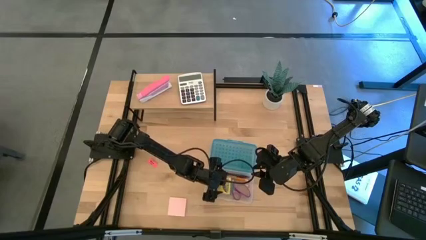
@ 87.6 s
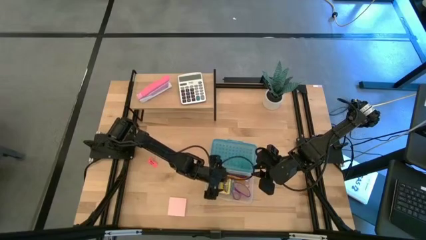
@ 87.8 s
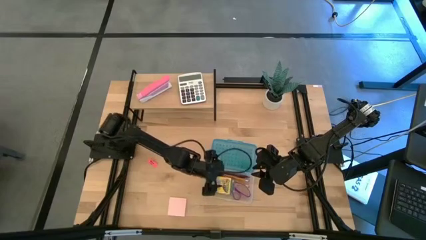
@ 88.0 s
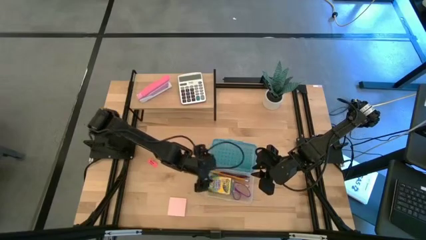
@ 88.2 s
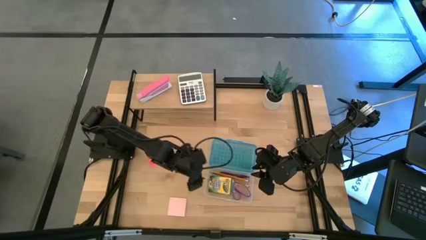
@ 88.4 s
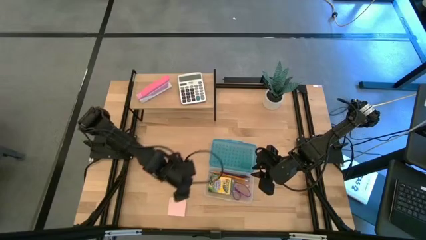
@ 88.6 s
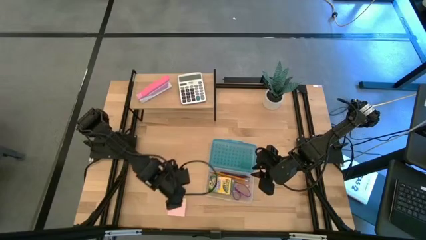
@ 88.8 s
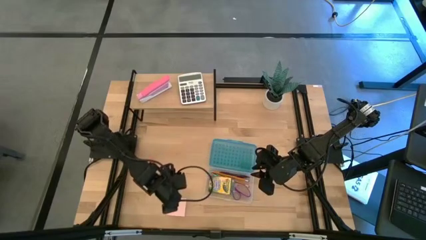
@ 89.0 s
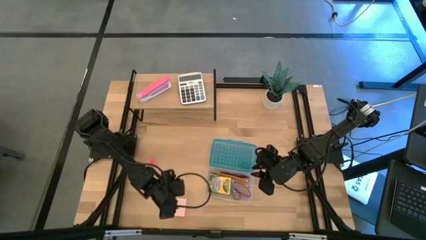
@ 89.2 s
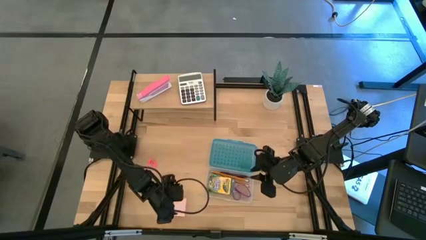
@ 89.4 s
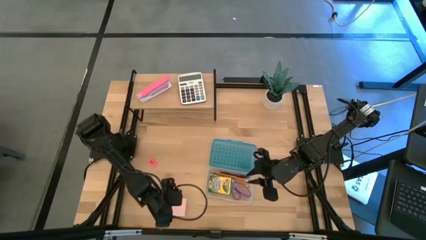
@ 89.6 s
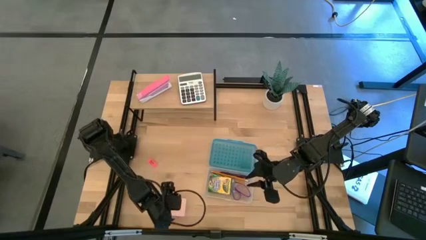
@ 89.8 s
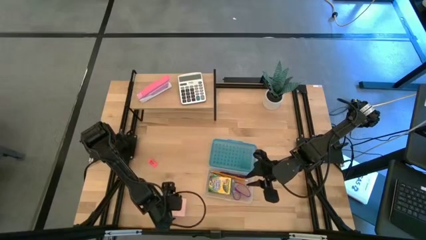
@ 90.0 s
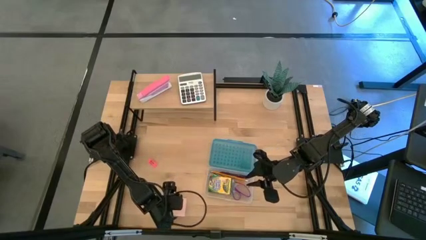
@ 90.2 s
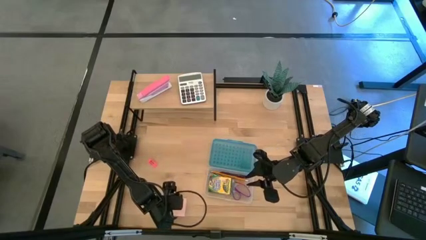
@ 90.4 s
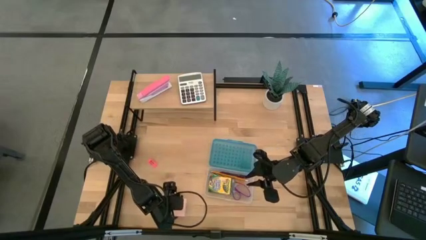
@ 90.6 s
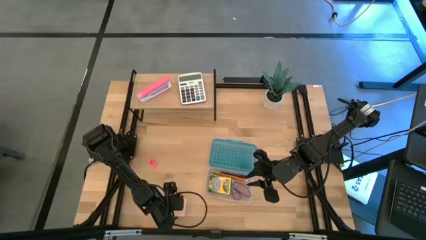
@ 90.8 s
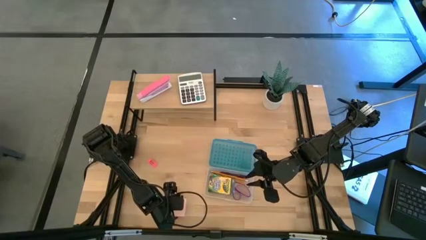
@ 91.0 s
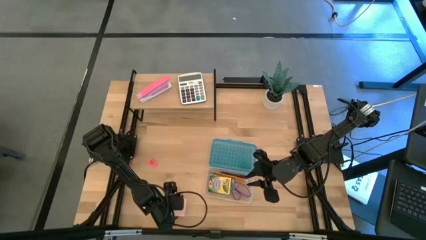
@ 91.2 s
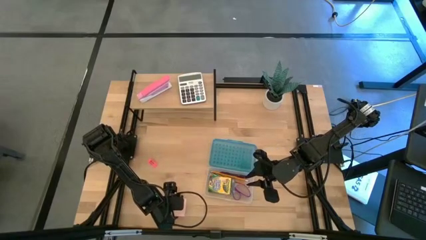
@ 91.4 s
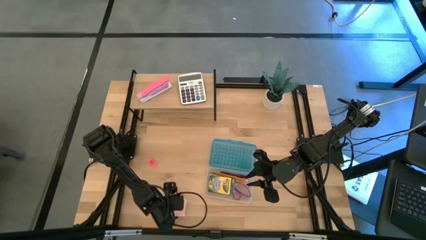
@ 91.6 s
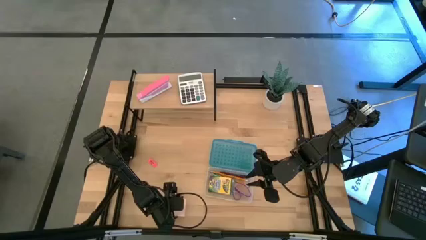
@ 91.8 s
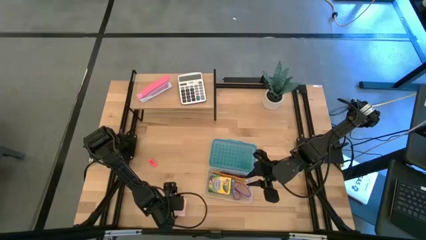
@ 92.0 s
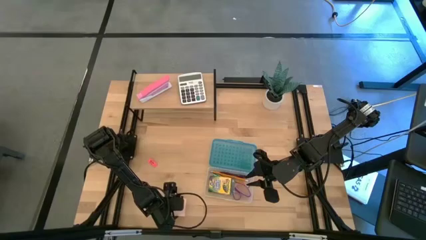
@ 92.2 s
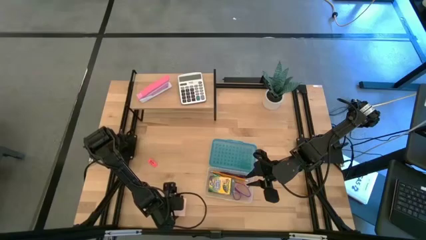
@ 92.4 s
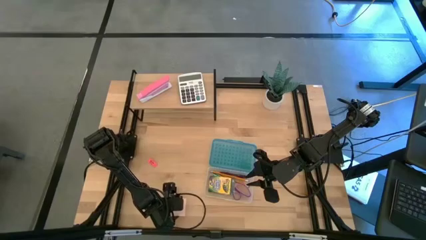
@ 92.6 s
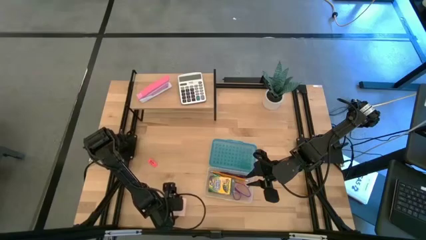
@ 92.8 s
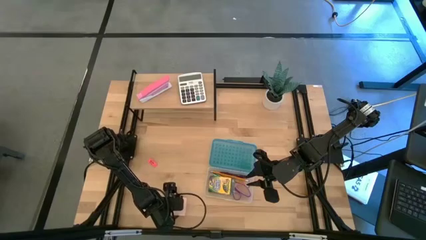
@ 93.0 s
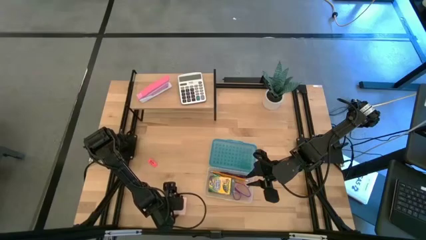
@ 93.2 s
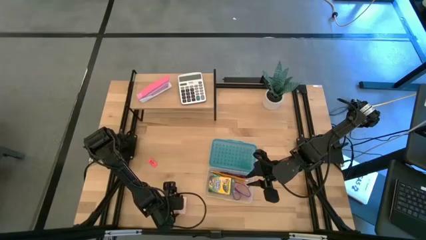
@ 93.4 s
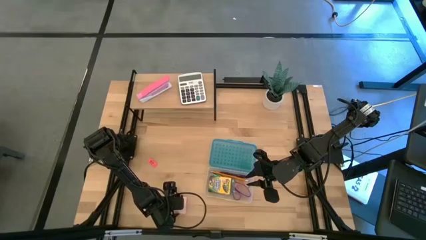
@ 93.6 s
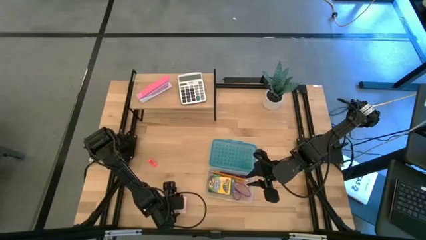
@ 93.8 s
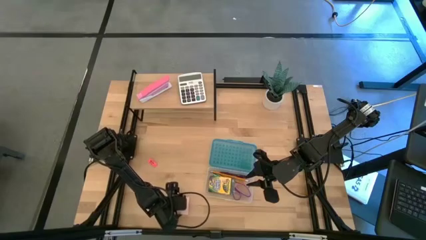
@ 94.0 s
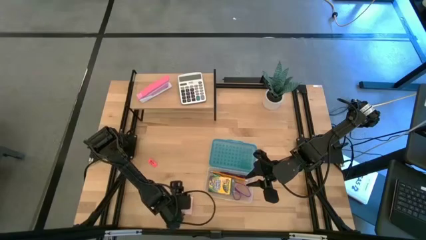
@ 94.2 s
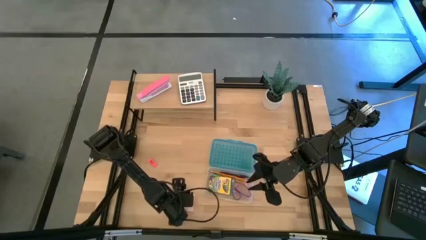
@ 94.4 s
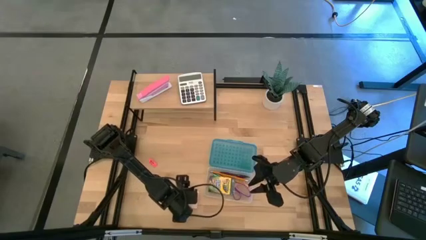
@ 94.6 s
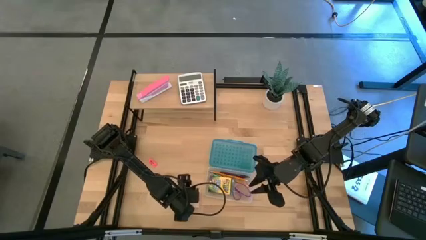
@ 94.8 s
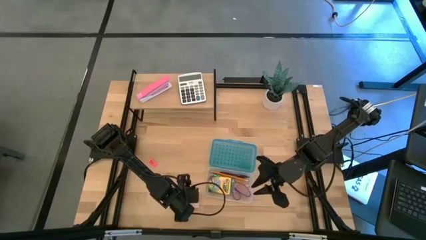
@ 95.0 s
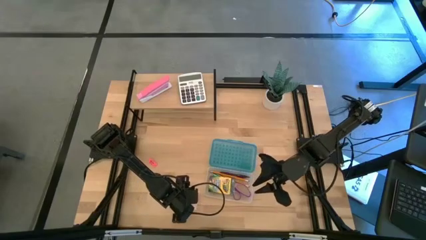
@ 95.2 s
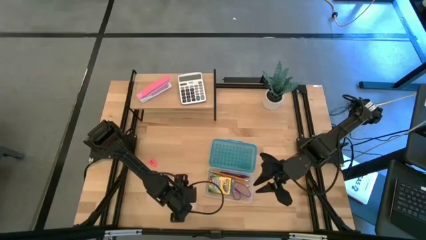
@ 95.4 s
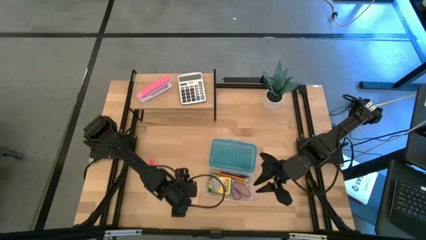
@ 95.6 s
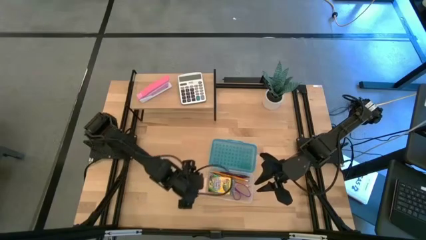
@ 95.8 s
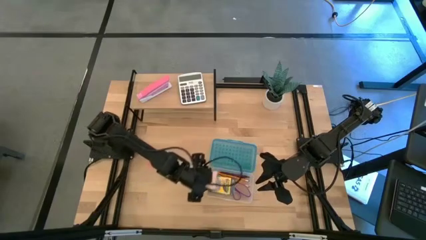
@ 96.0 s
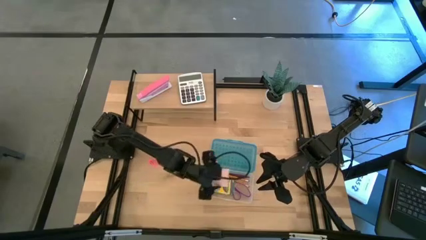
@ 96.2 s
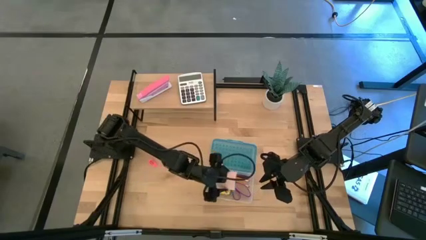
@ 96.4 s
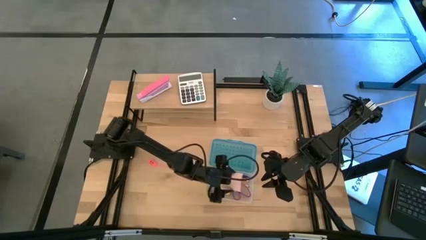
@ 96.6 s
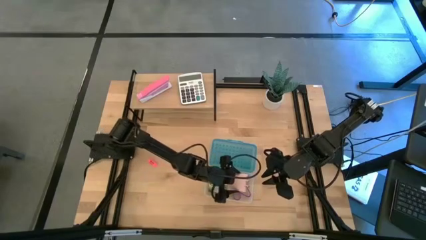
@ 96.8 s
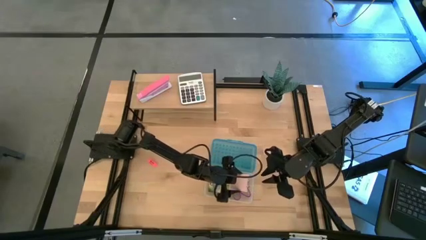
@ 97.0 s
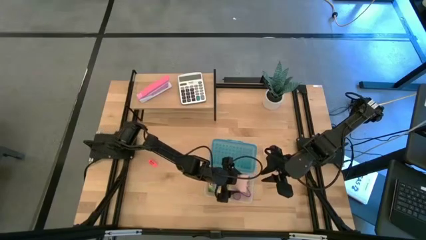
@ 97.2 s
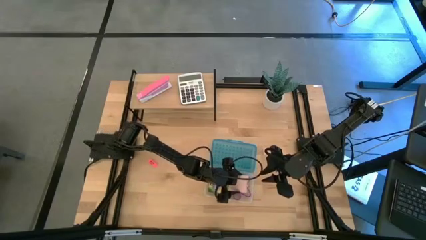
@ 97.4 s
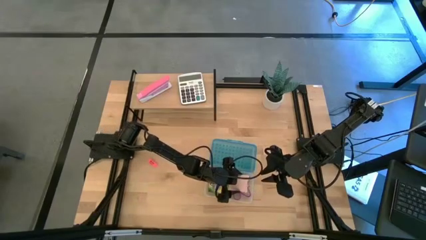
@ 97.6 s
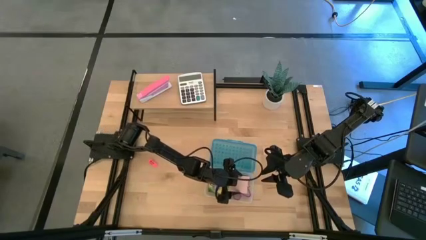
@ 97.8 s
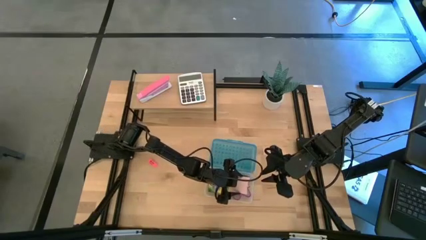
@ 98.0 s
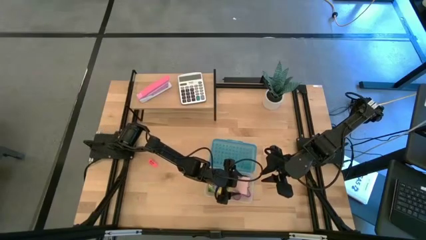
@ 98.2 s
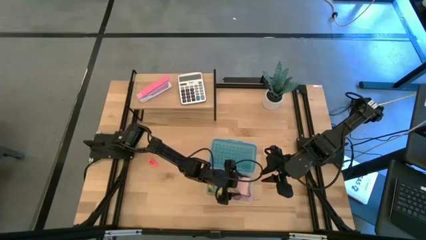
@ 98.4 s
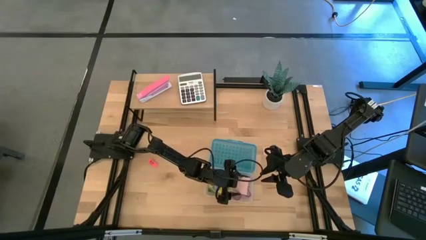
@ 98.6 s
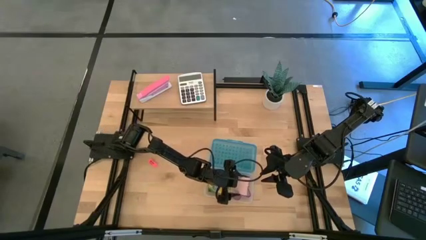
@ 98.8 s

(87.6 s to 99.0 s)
Task: Pack school essentials
Put the pink sticky note into the blue supply box
